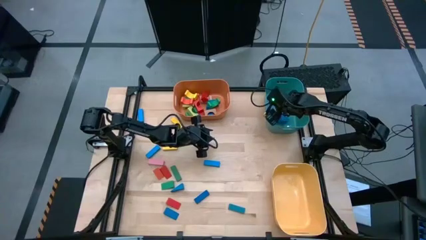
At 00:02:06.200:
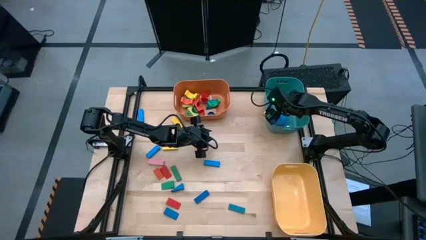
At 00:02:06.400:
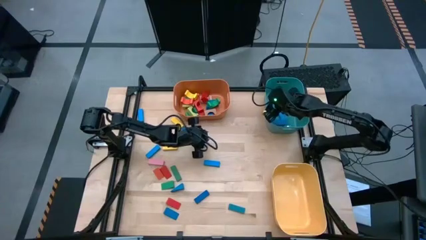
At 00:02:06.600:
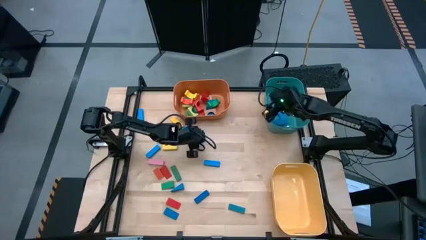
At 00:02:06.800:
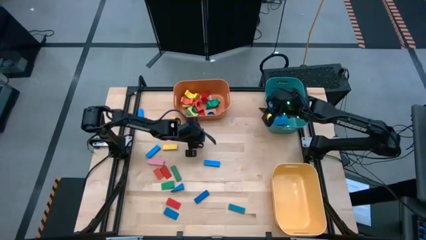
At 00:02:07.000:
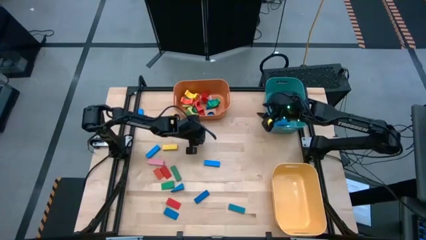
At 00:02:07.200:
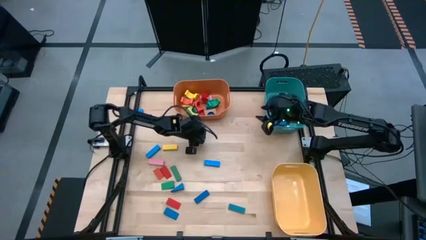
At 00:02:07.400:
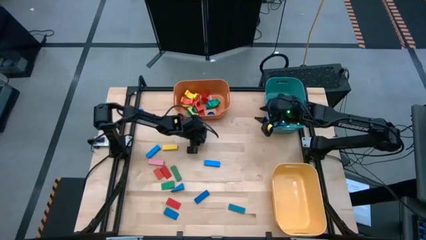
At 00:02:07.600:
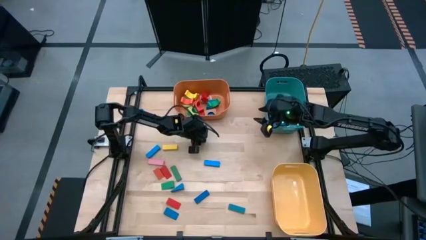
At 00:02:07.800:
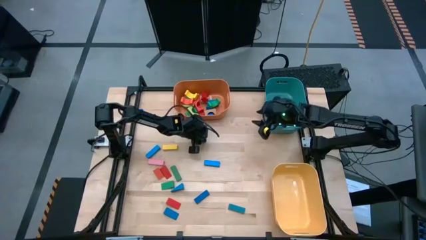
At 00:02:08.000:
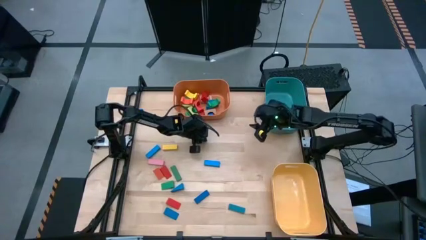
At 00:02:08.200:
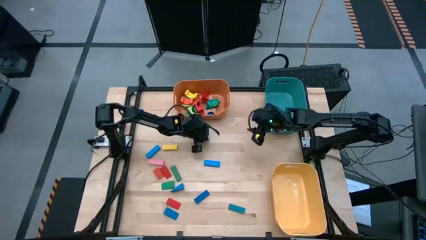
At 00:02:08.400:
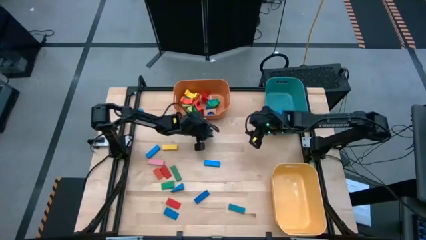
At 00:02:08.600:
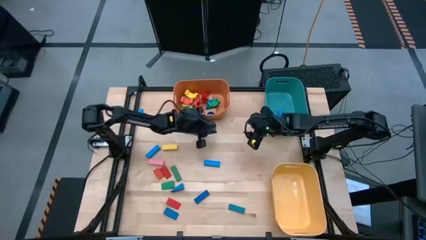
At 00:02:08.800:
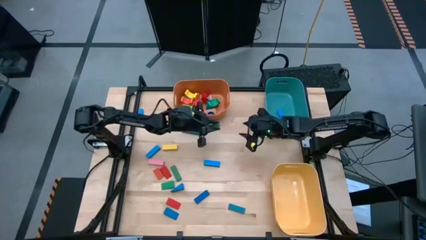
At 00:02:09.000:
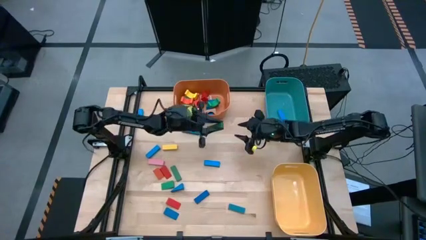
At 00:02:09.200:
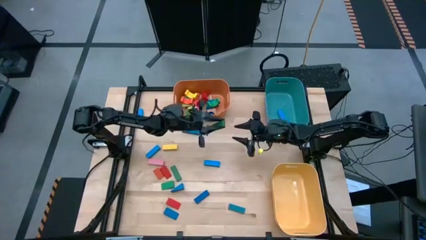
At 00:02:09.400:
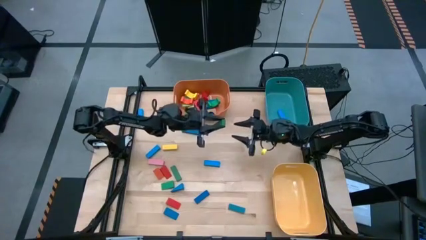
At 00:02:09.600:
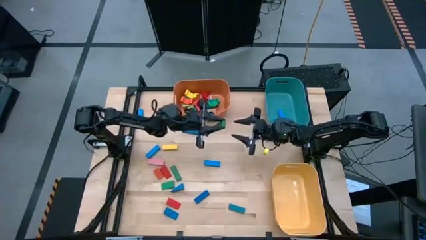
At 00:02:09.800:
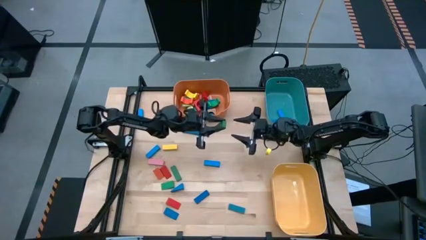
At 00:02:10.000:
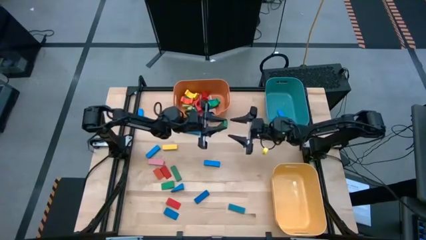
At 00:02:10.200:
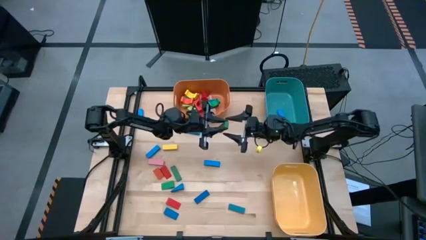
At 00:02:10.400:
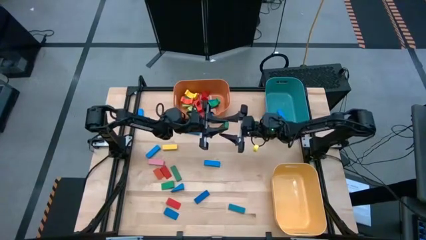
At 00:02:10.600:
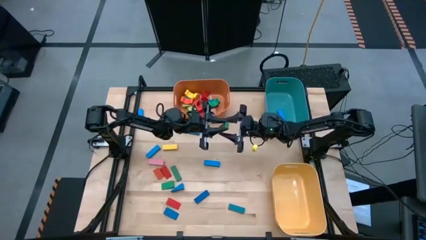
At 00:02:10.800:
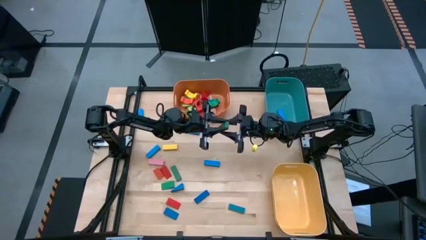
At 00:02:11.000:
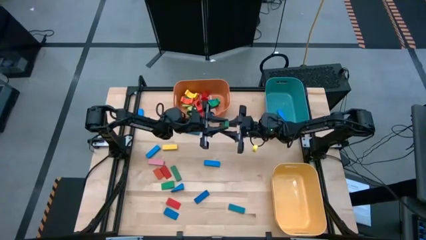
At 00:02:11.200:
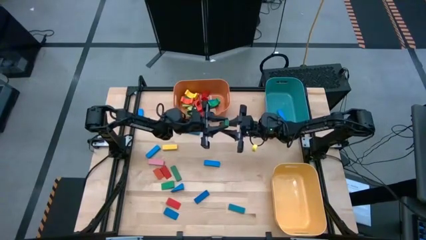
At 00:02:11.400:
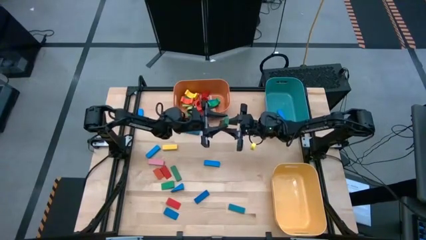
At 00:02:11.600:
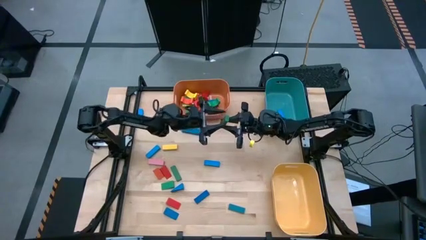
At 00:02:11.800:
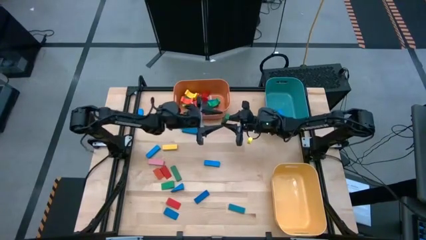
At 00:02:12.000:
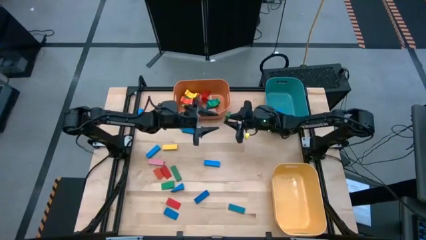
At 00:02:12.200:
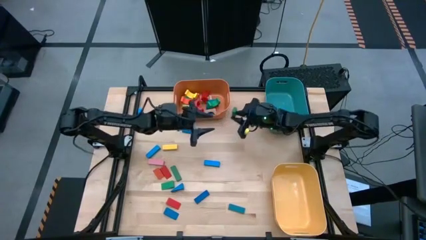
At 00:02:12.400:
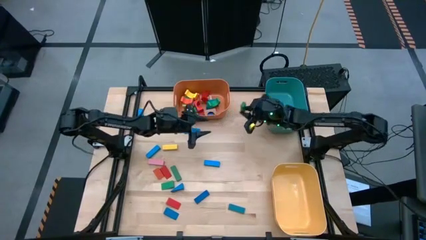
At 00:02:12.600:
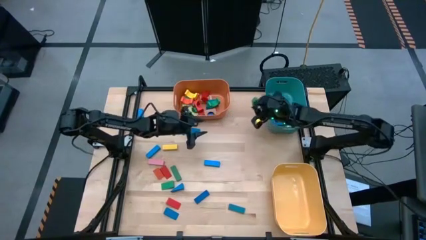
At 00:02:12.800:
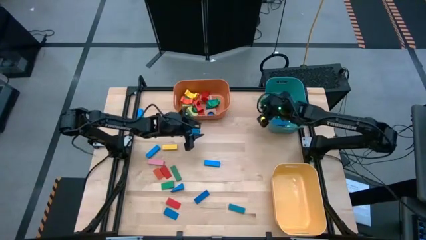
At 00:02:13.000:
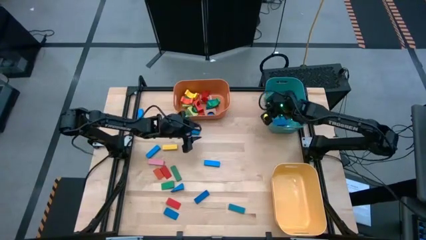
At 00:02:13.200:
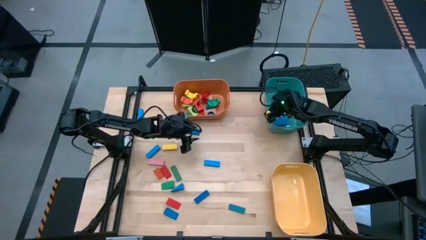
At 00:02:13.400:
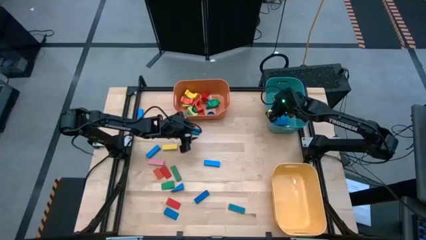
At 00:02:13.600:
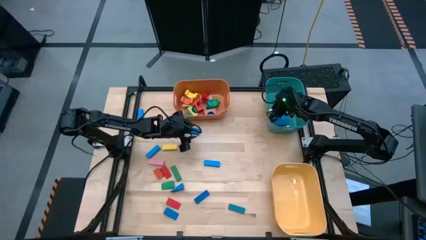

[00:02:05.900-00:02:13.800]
Task: Sort blocks by size
Put the green rectangular block into the green bin

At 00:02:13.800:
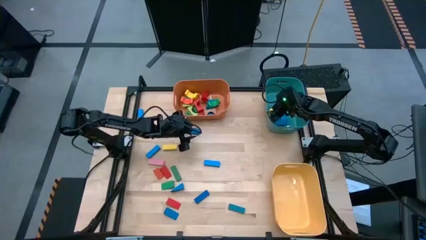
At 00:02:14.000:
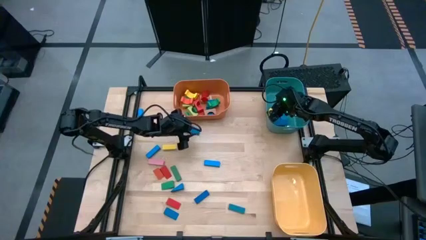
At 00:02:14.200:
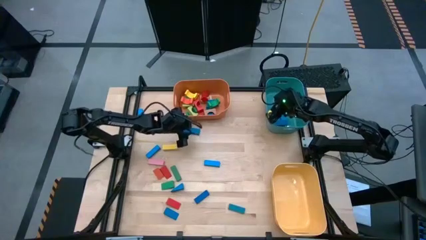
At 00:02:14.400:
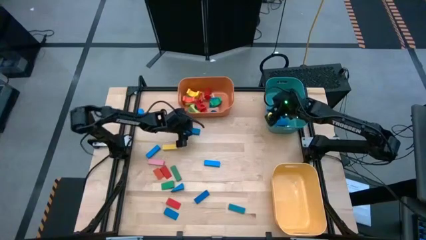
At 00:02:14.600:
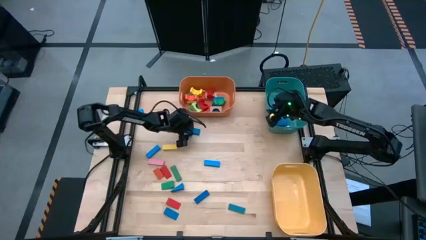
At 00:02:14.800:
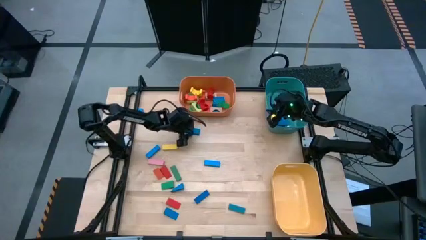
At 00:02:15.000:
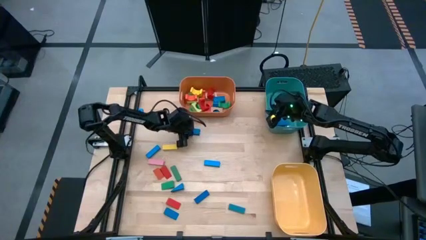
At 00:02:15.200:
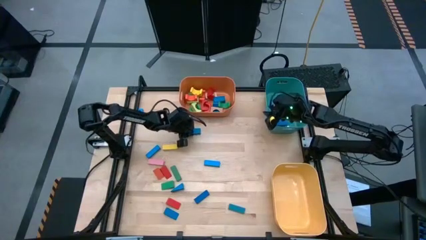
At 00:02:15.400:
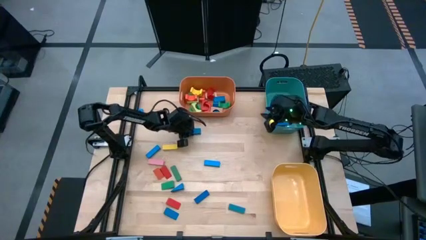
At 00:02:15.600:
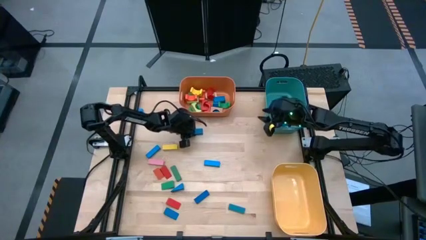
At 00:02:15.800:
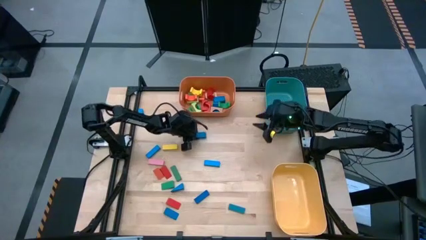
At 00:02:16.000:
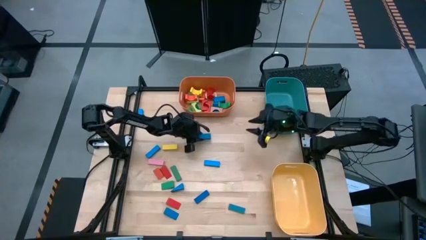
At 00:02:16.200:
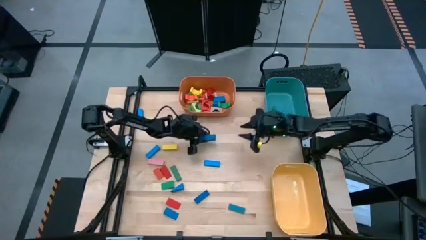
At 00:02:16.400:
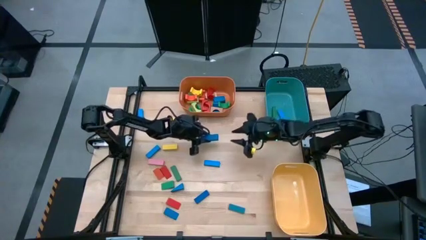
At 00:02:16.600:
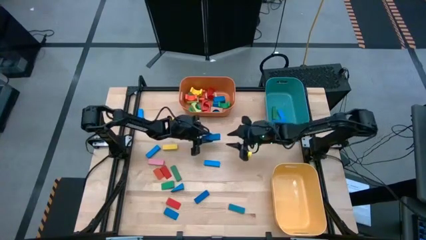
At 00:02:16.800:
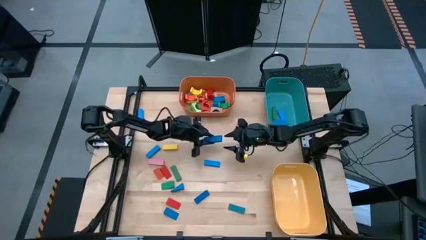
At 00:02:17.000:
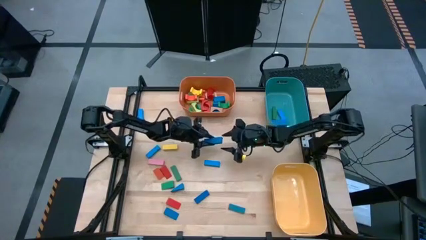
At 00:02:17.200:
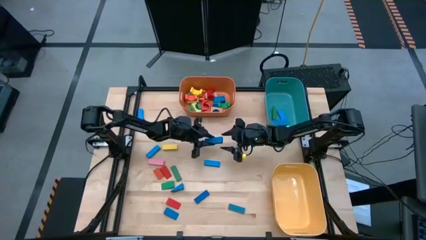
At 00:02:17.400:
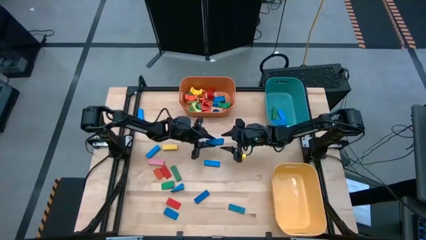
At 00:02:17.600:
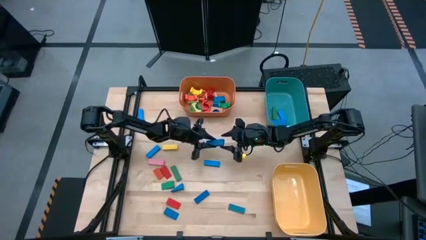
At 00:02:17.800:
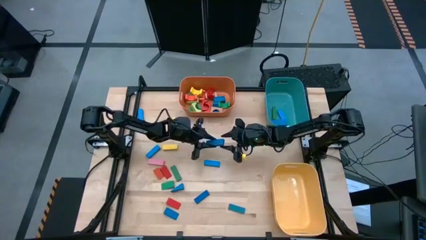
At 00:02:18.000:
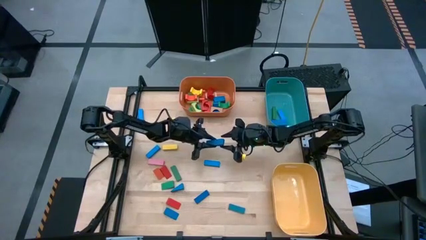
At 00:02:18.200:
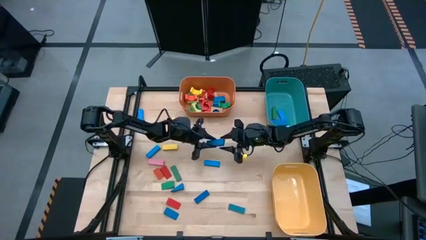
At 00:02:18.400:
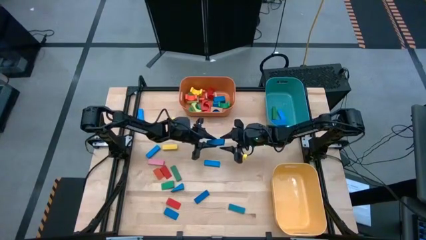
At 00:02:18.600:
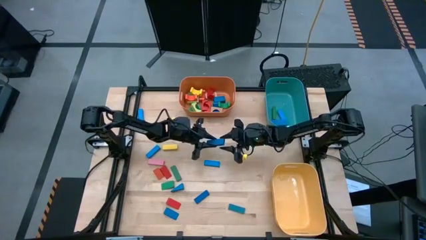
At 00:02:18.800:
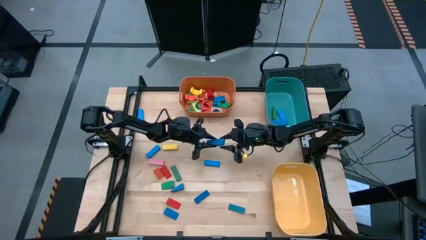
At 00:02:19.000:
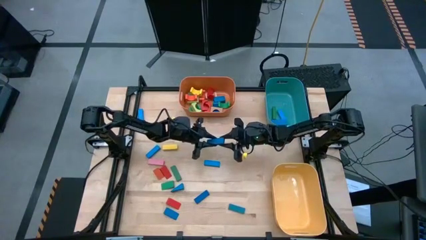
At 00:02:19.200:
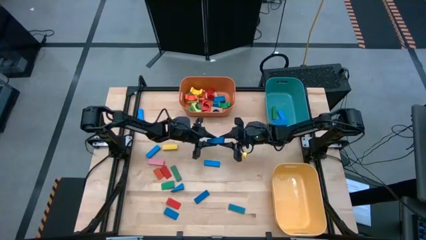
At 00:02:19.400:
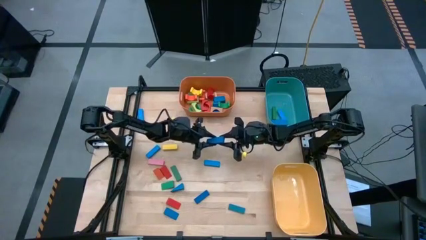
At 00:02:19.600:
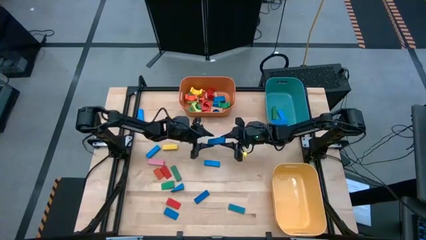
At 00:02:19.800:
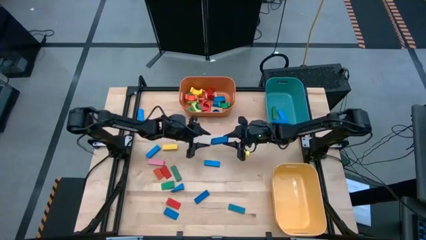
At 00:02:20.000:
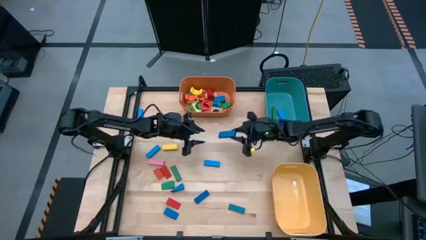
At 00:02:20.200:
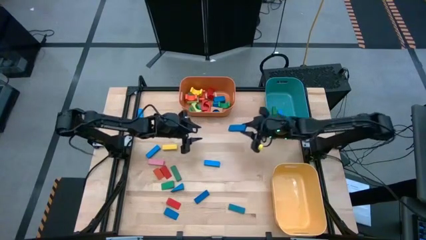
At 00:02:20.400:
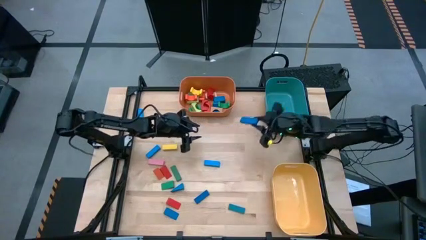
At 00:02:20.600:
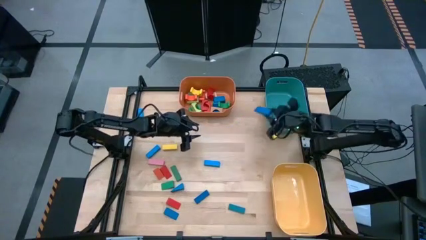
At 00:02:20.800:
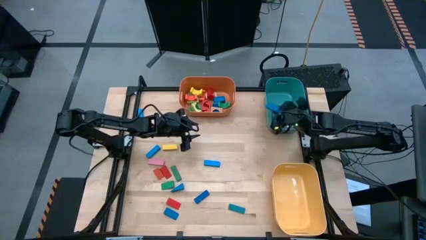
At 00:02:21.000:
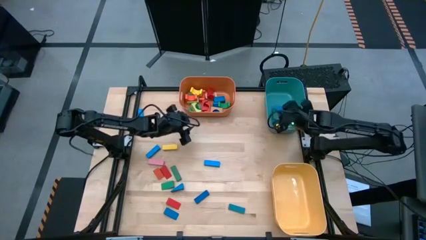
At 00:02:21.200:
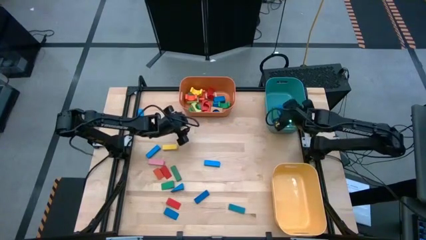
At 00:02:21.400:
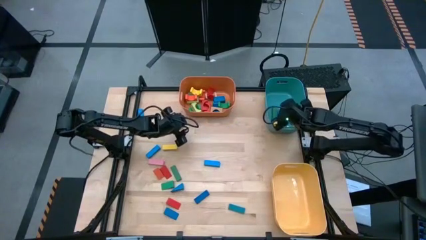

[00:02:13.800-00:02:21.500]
Put the blue rectangular block into the green bin
